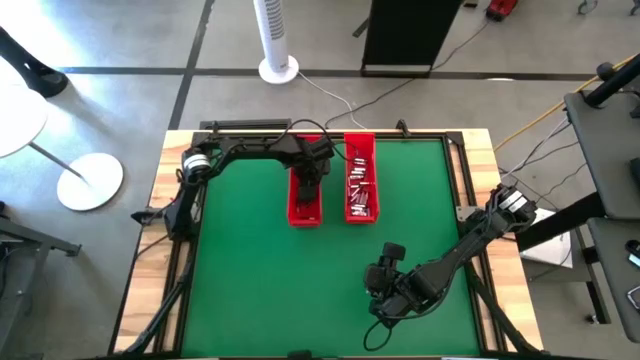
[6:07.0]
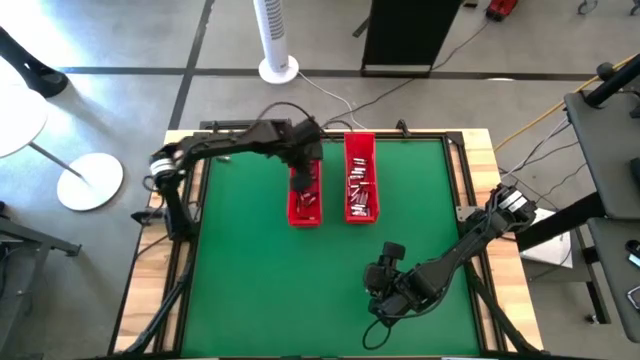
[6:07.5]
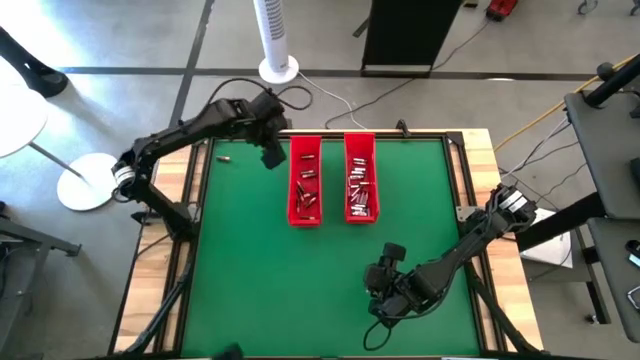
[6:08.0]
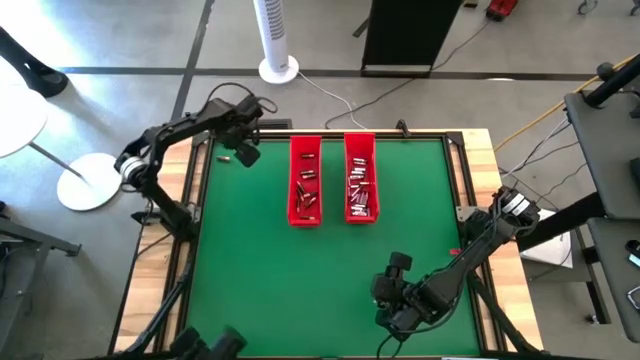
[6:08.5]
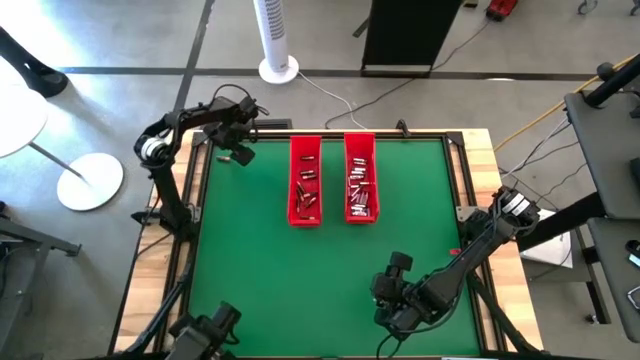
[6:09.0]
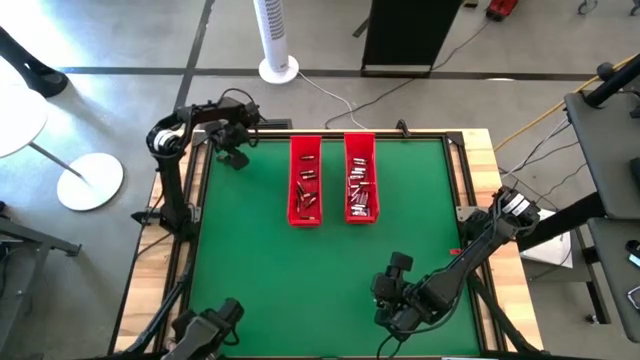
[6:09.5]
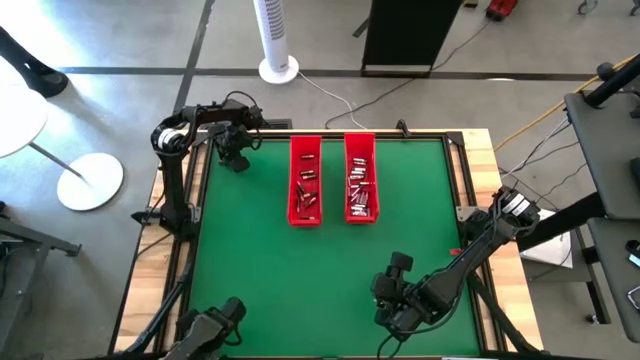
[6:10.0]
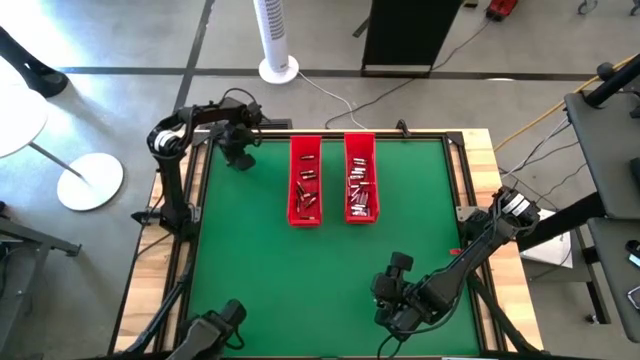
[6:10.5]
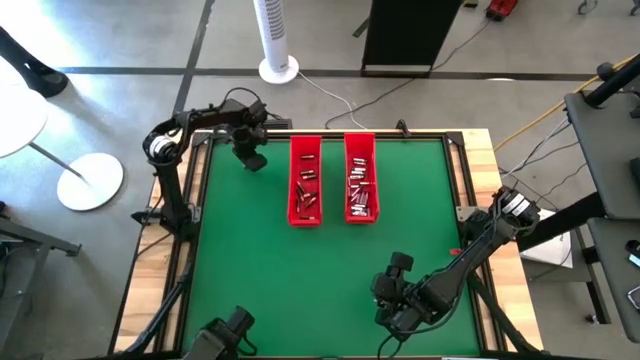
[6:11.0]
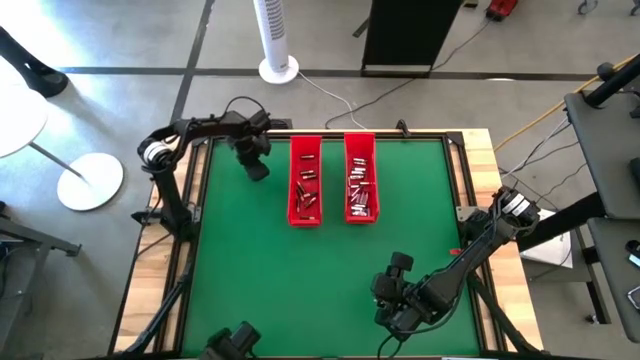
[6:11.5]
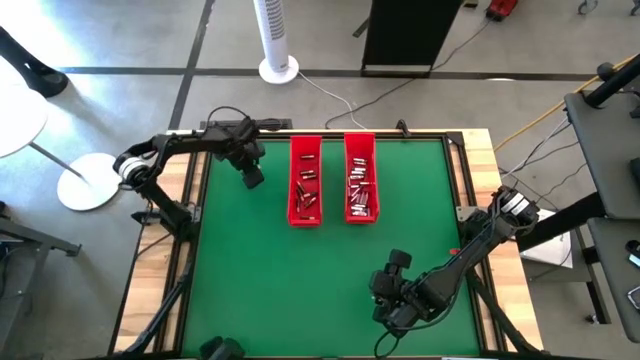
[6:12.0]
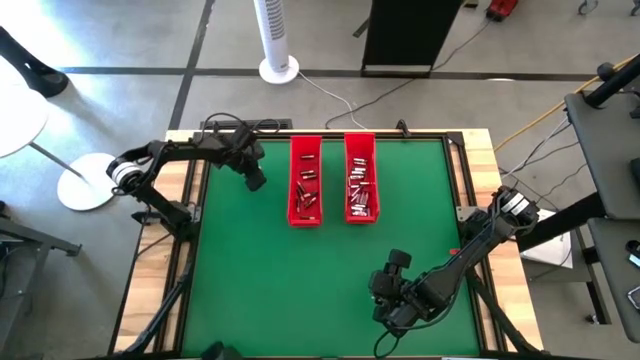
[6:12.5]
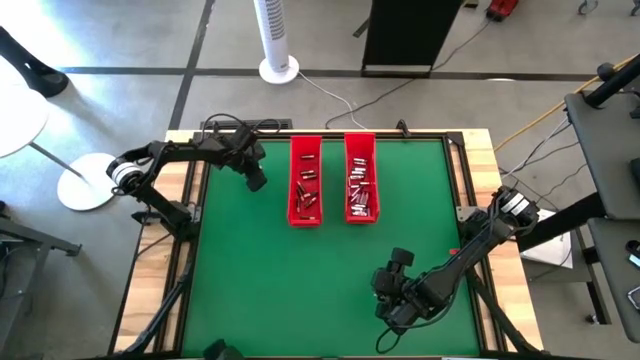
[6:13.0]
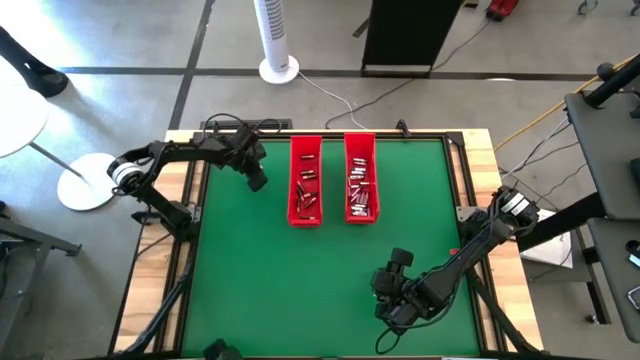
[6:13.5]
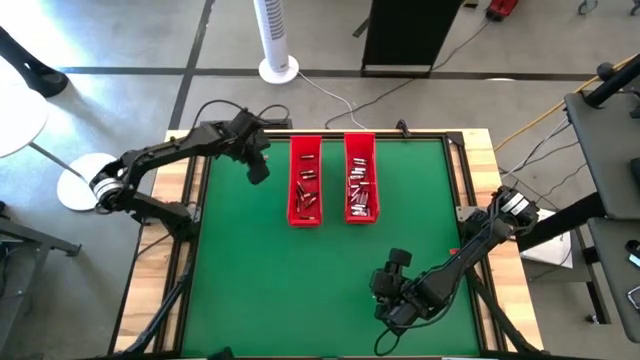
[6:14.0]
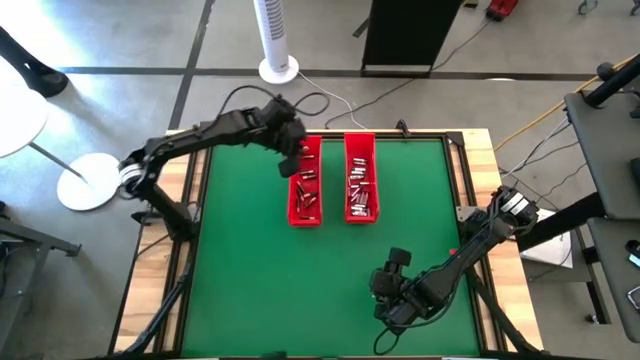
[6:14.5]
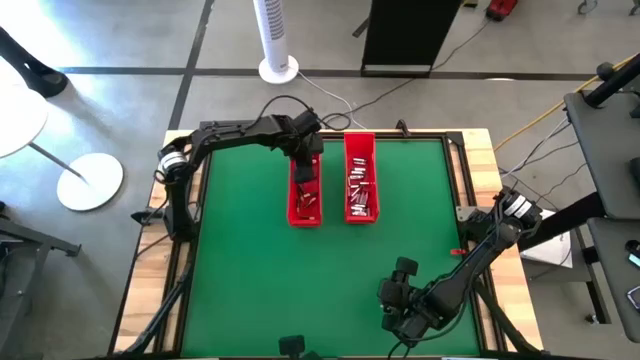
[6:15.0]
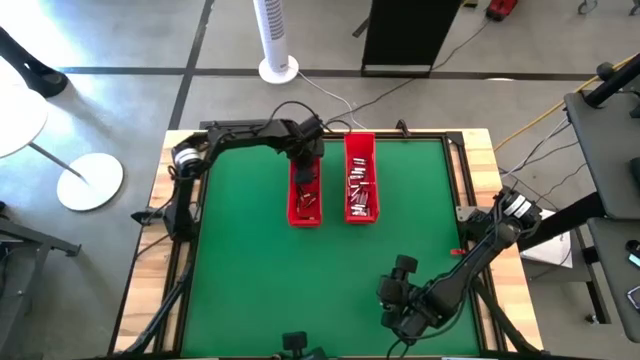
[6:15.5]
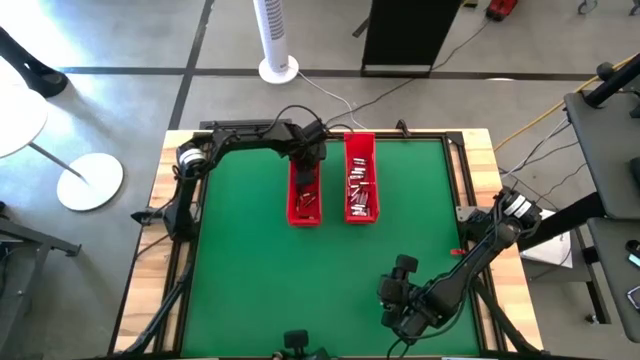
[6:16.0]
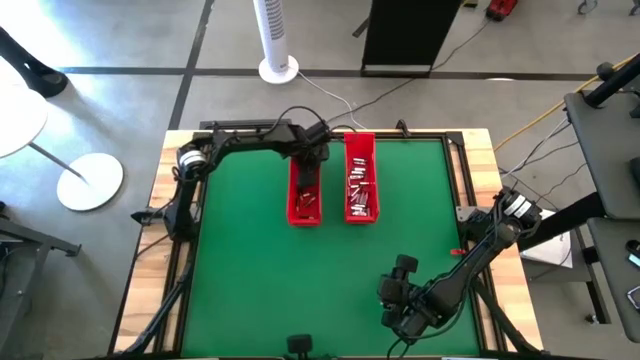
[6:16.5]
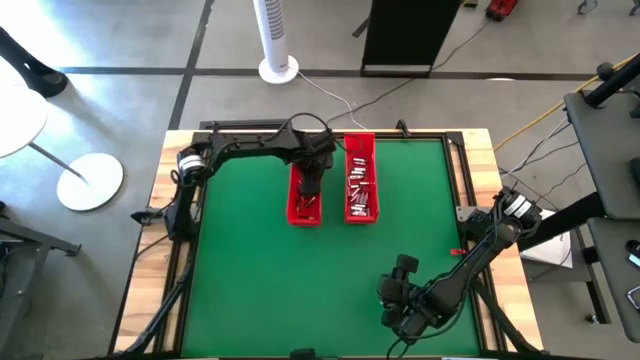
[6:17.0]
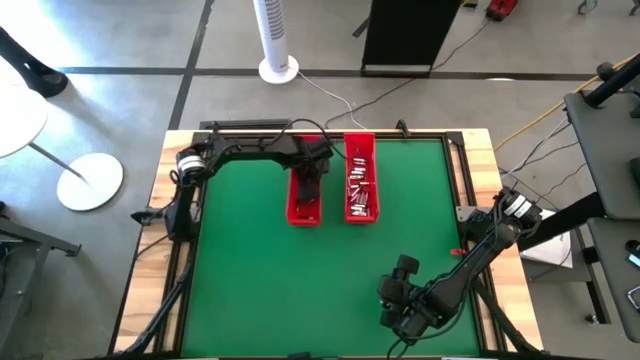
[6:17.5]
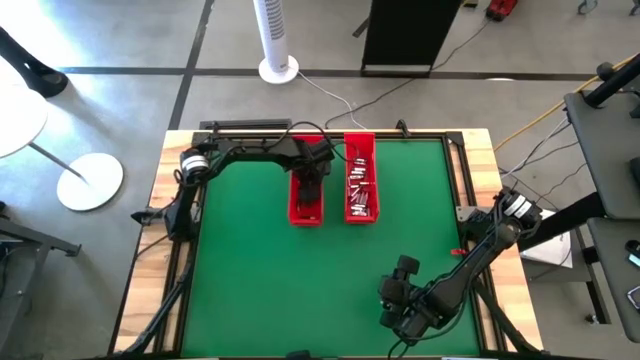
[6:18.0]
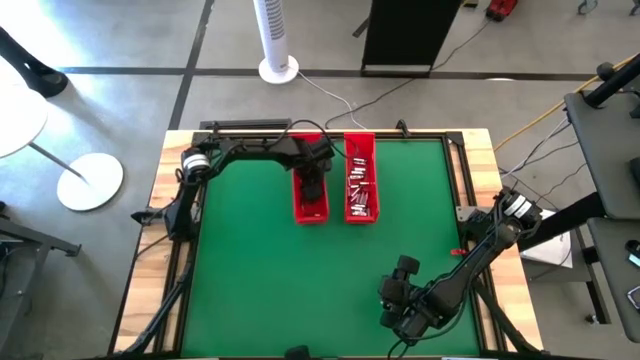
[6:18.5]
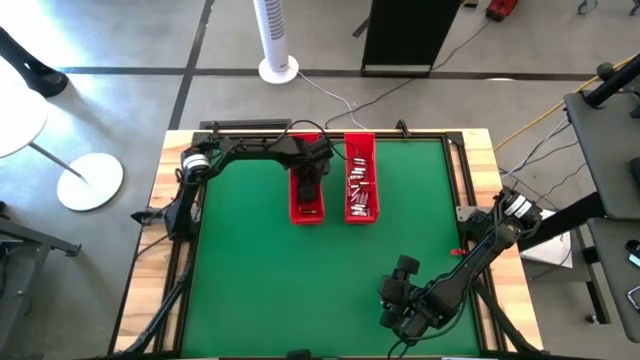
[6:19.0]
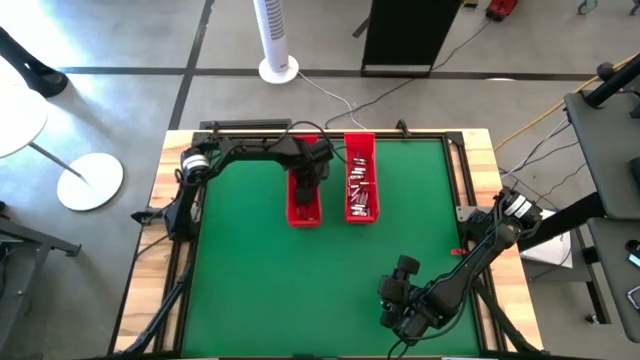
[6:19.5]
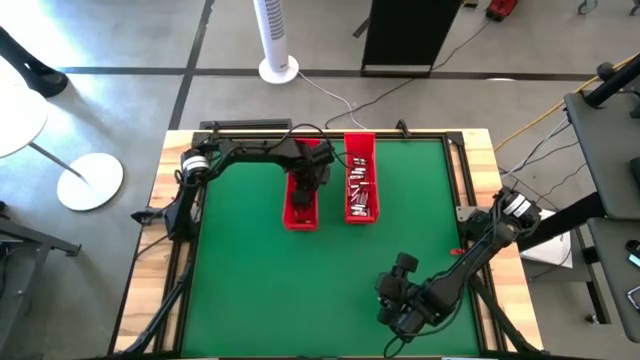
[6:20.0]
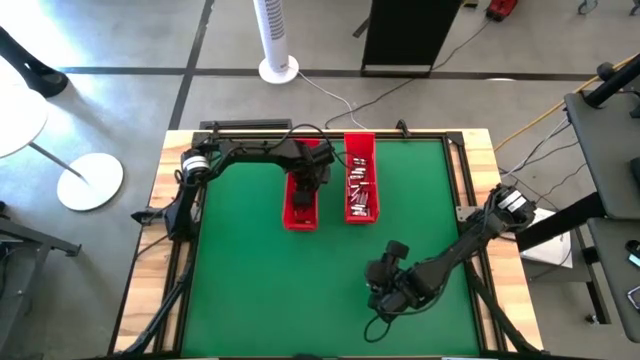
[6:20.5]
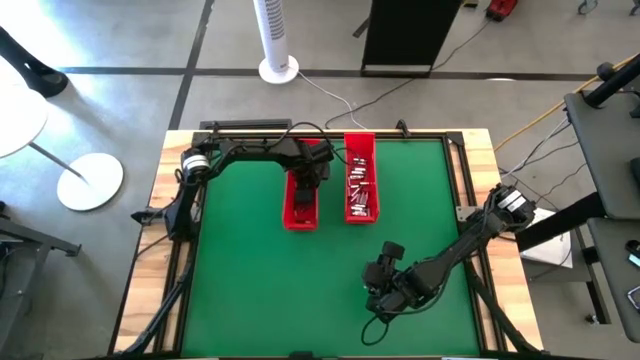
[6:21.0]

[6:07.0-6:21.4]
Task: Sort batteries
Put the black battery into the left red bin

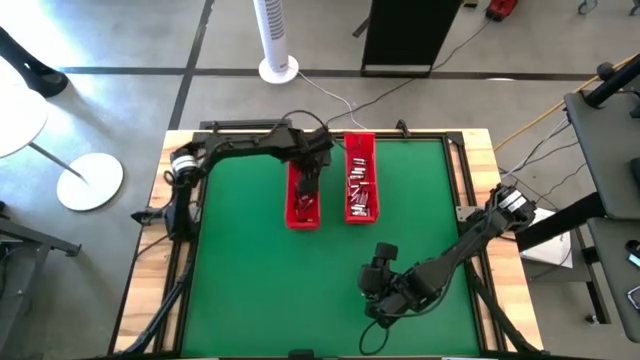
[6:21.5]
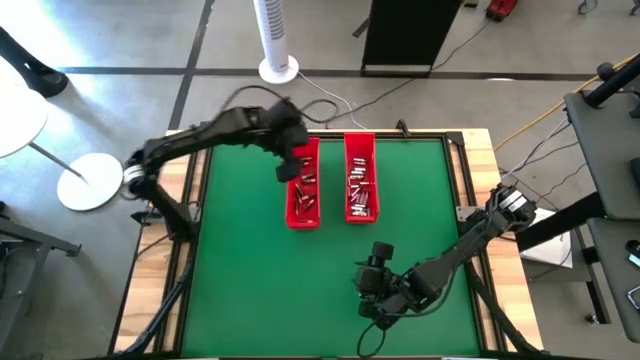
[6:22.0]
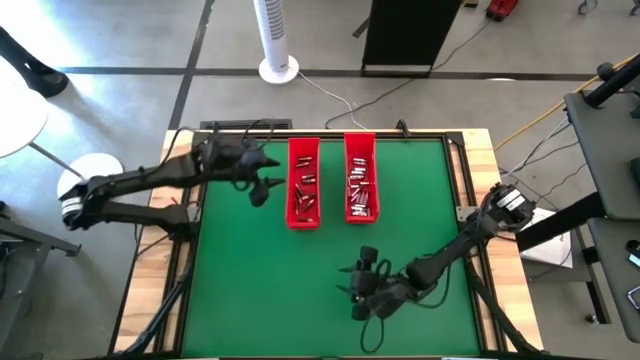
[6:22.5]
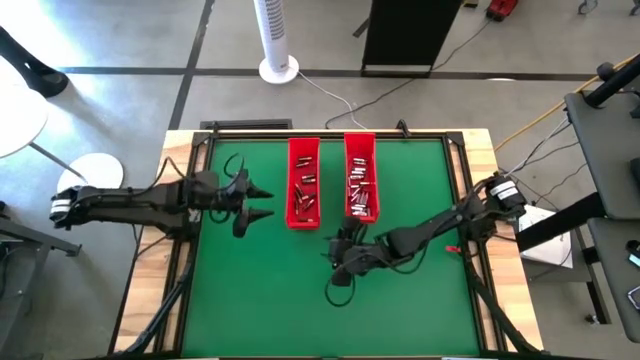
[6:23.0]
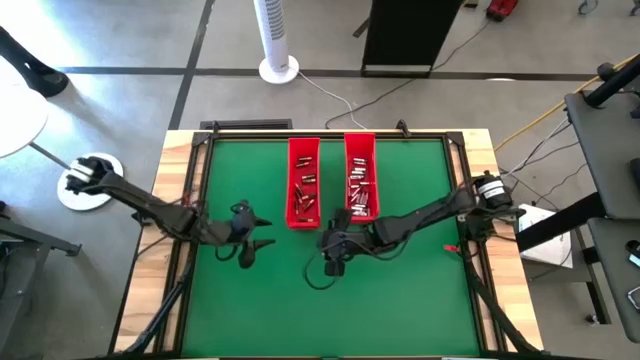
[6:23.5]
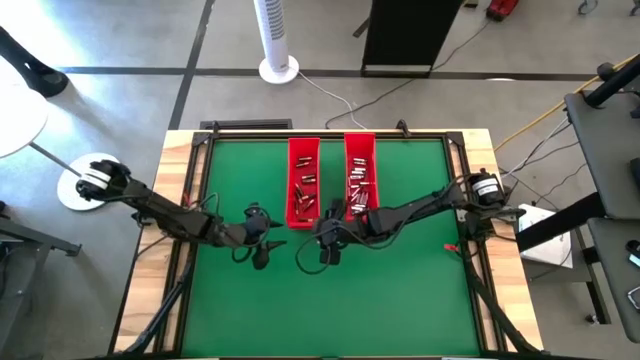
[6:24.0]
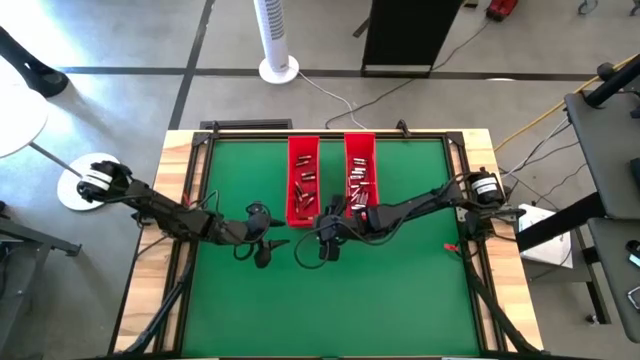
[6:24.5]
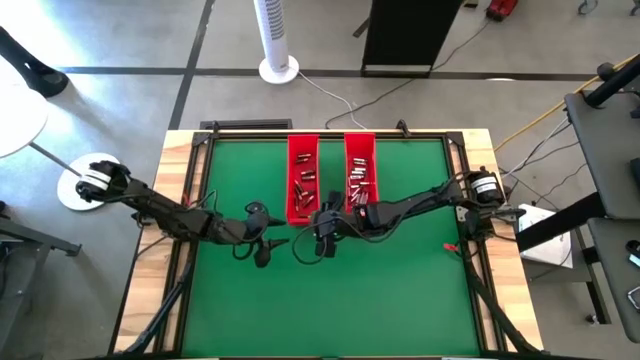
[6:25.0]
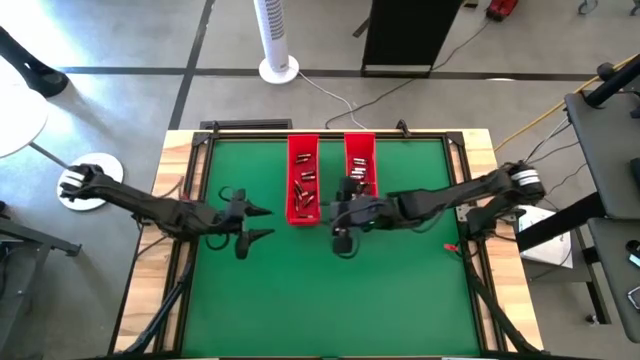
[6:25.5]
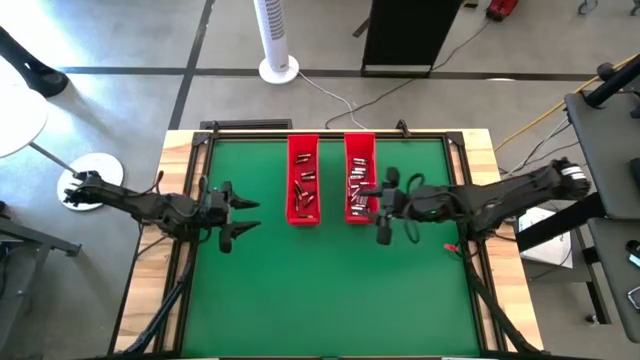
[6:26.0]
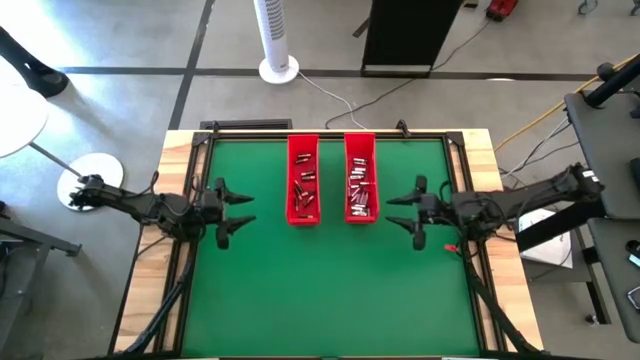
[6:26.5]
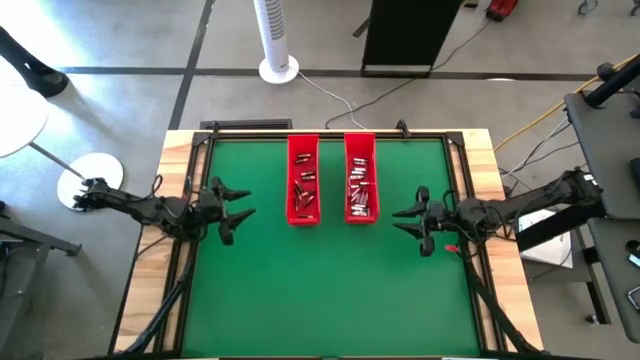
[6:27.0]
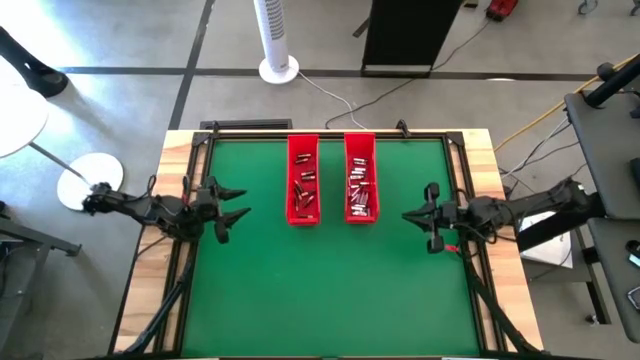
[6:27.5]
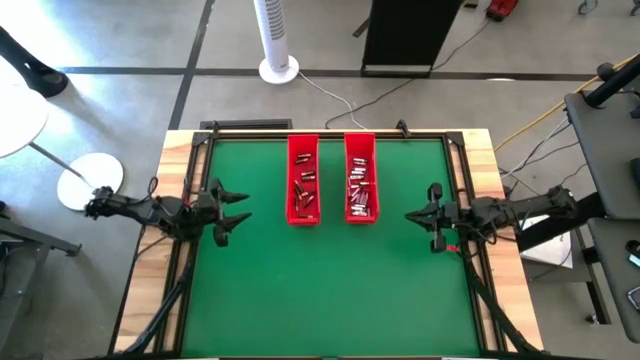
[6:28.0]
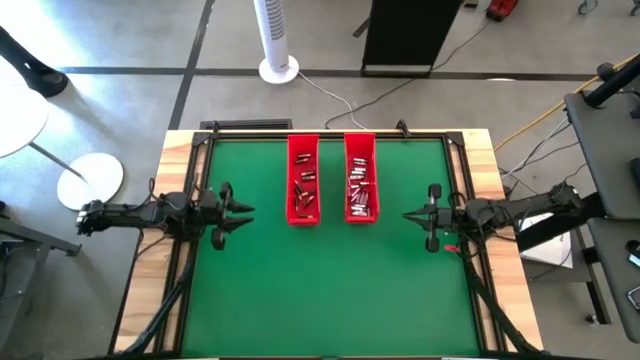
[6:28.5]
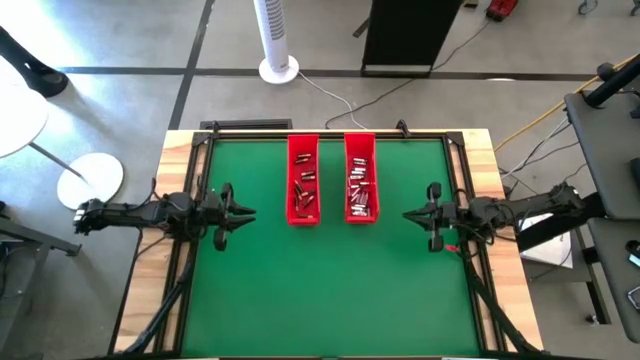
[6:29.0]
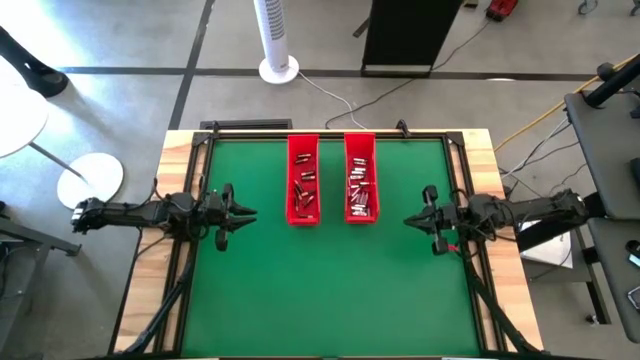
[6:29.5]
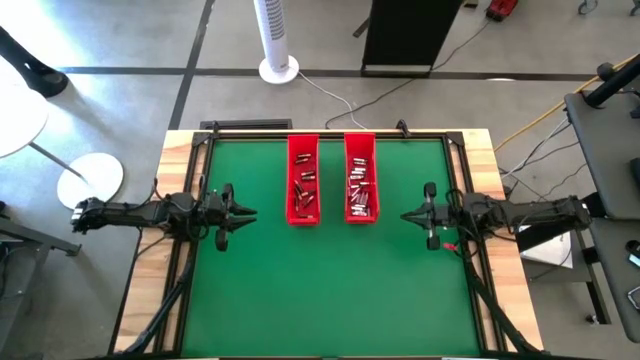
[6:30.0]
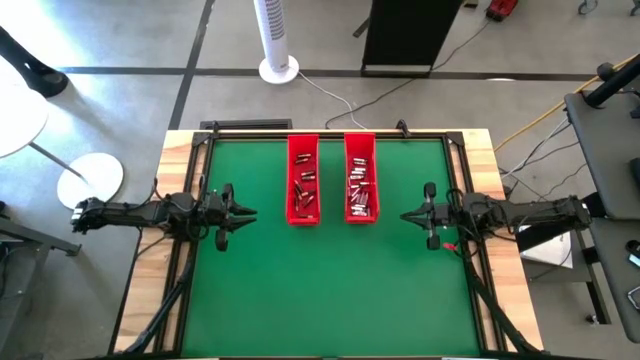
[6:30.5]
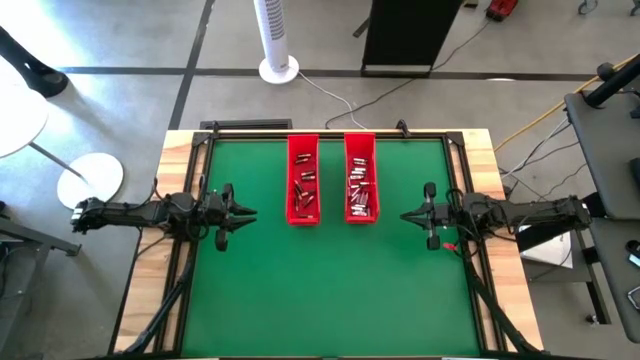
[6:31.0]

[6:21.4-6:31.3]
Return to Home Position
